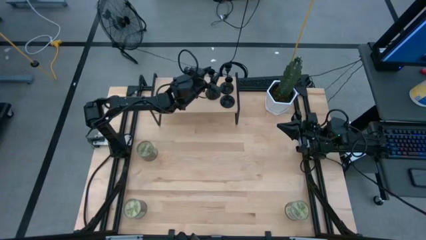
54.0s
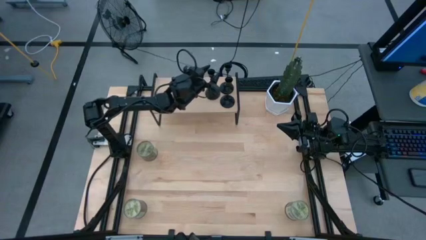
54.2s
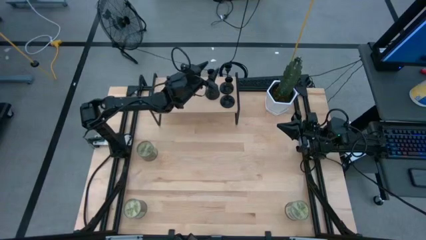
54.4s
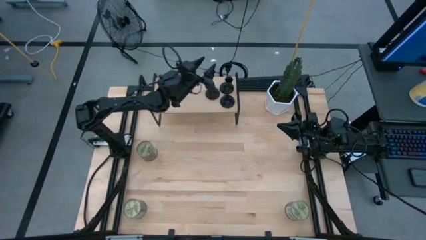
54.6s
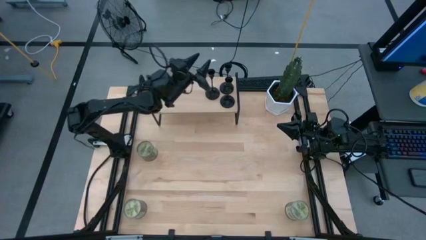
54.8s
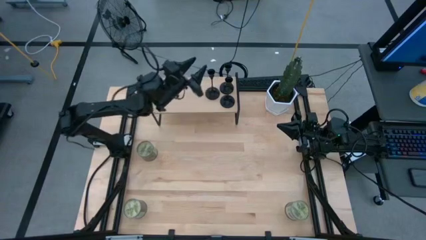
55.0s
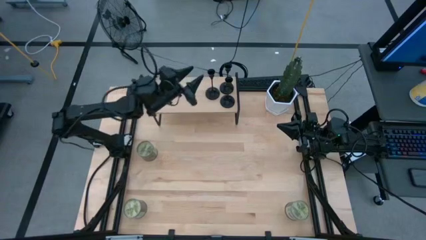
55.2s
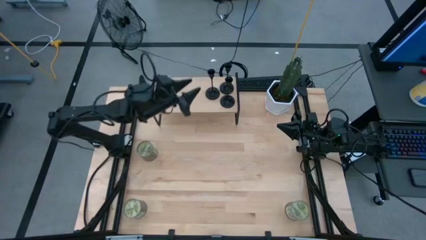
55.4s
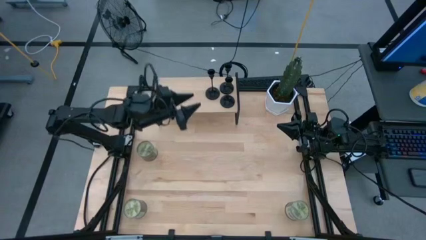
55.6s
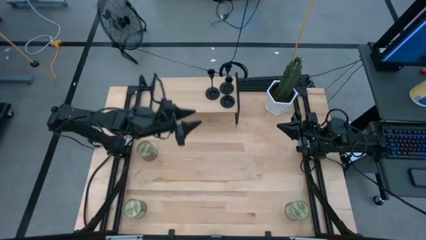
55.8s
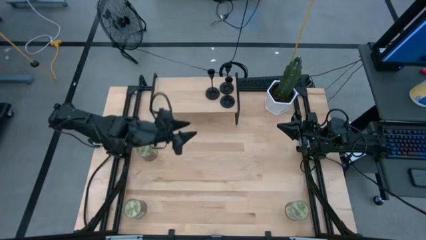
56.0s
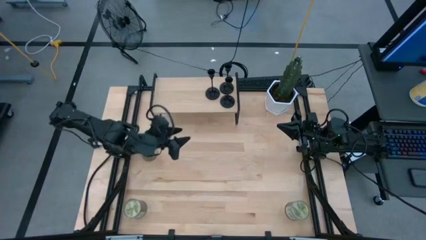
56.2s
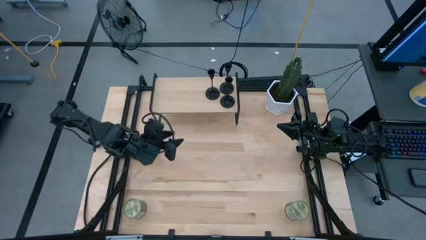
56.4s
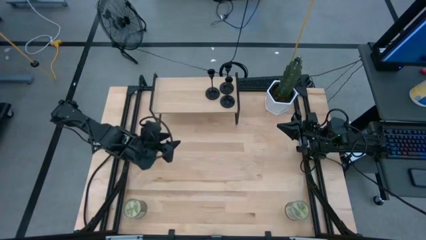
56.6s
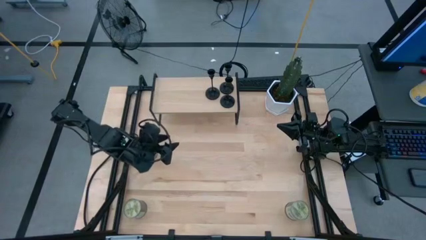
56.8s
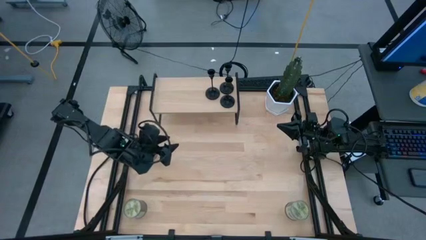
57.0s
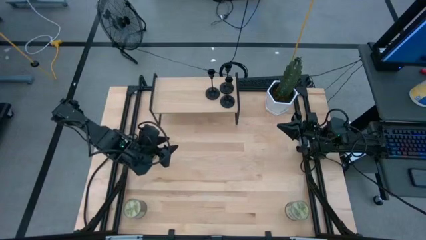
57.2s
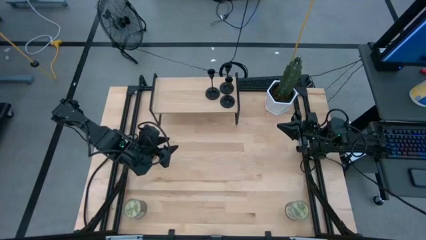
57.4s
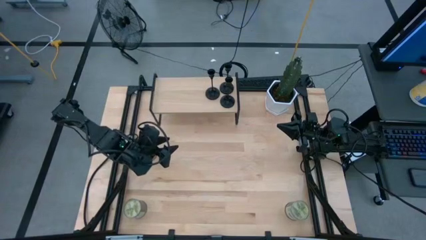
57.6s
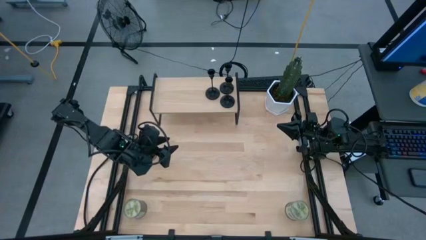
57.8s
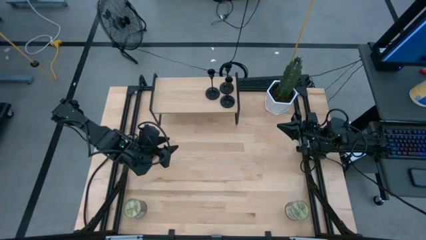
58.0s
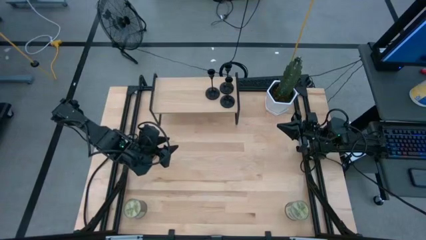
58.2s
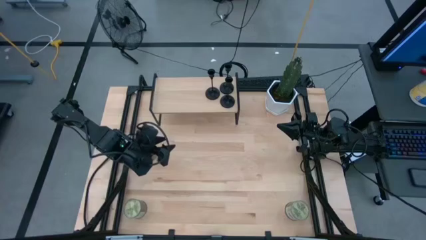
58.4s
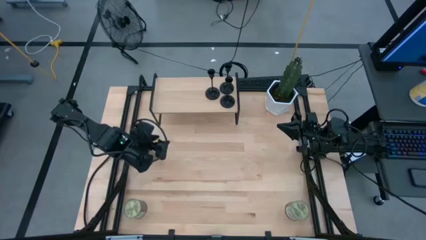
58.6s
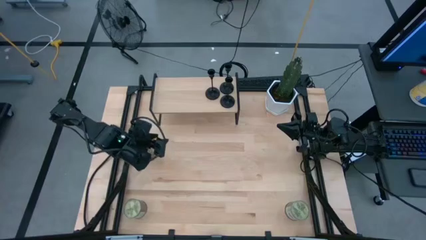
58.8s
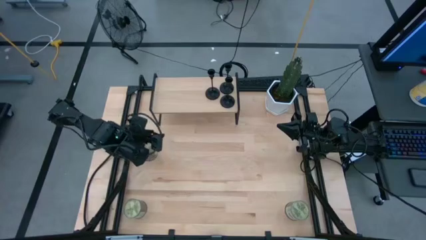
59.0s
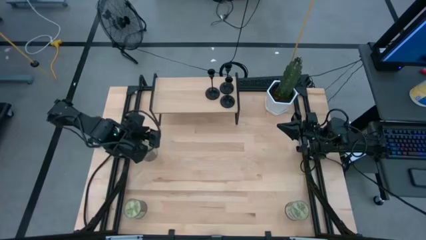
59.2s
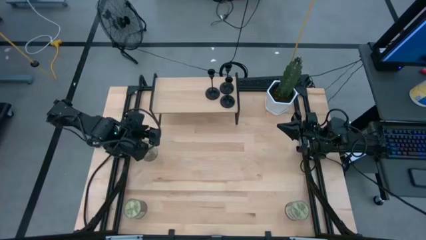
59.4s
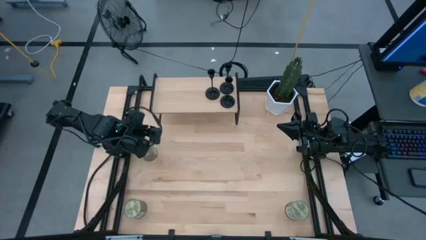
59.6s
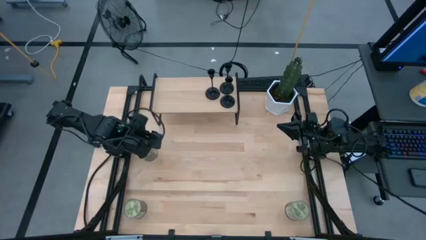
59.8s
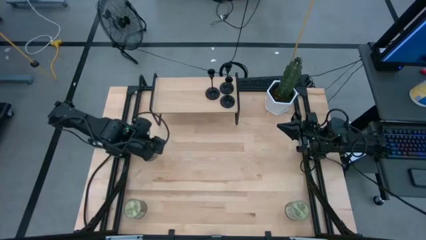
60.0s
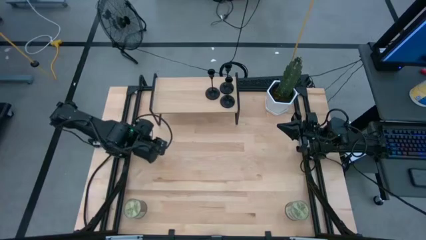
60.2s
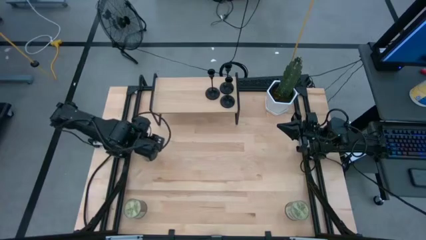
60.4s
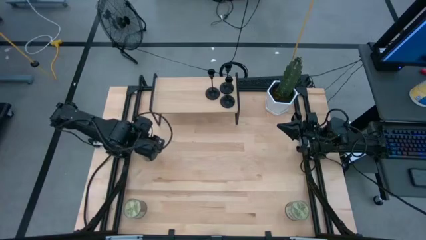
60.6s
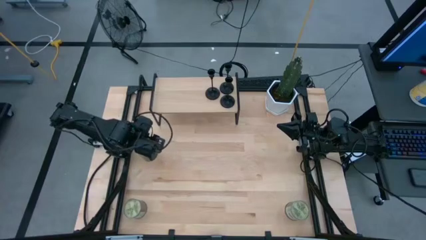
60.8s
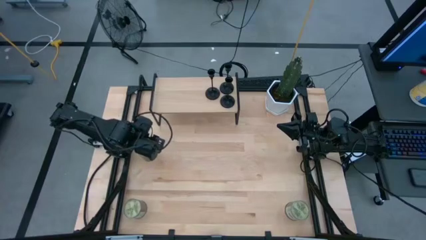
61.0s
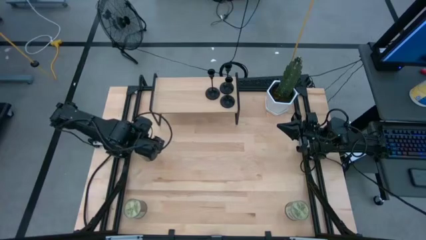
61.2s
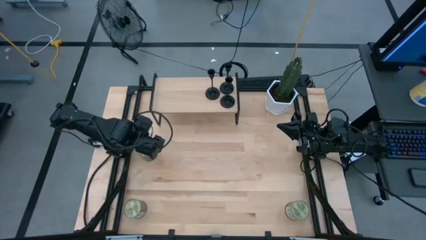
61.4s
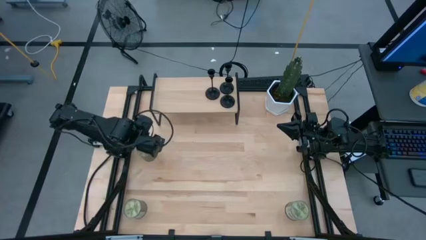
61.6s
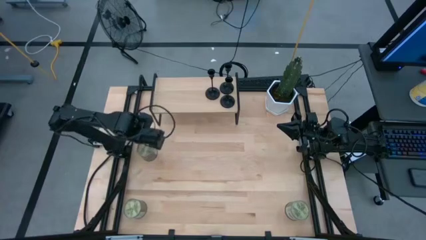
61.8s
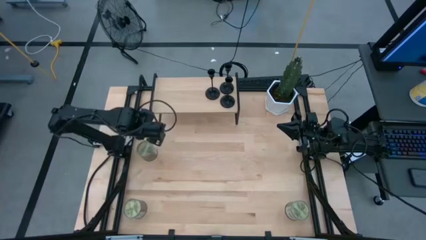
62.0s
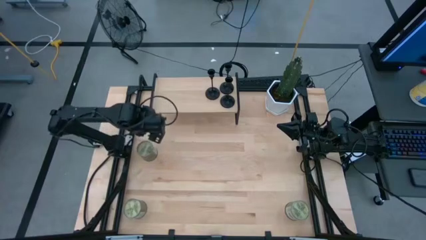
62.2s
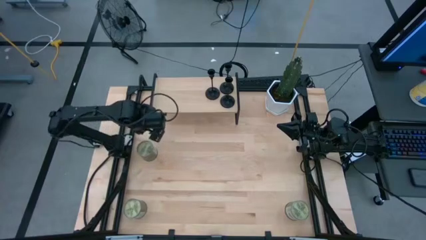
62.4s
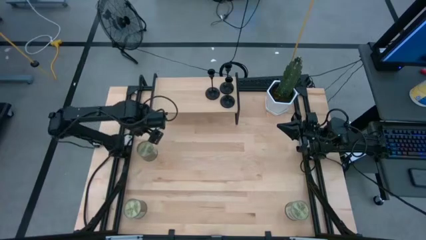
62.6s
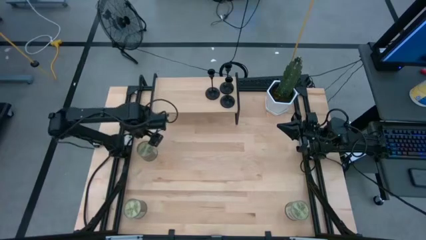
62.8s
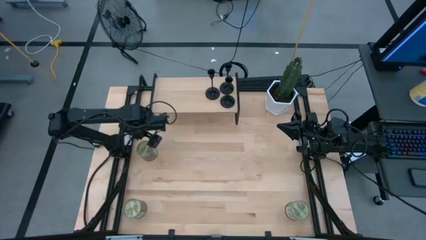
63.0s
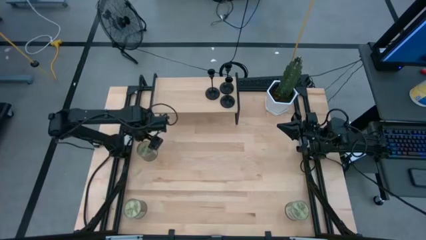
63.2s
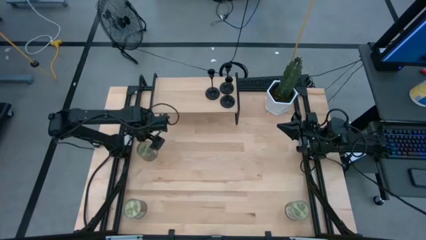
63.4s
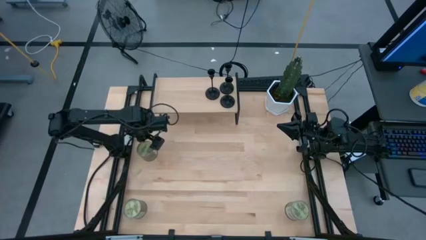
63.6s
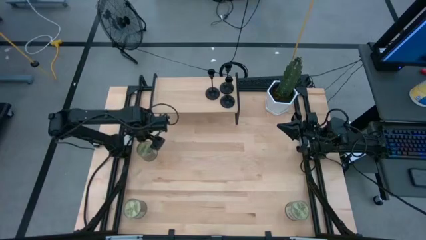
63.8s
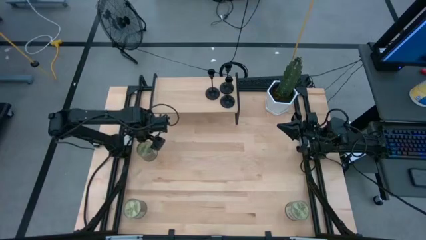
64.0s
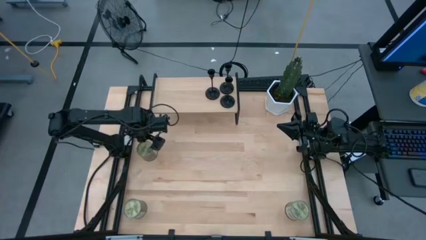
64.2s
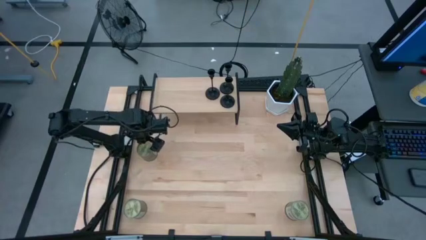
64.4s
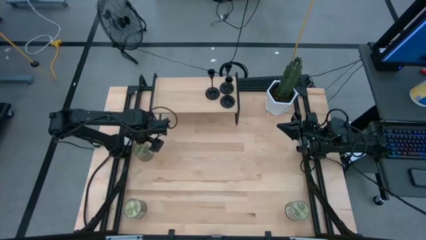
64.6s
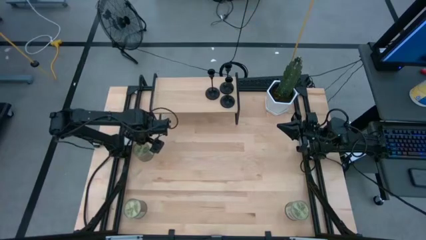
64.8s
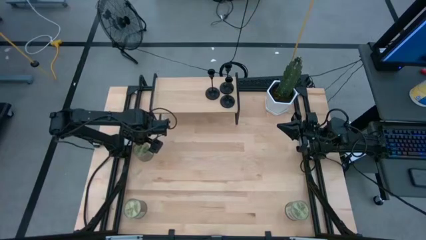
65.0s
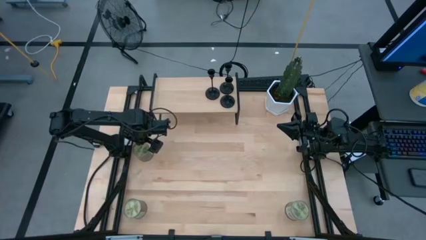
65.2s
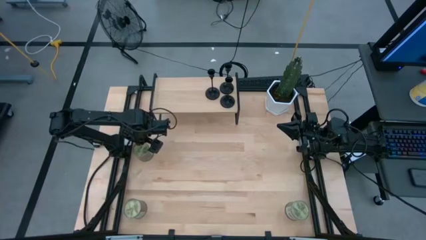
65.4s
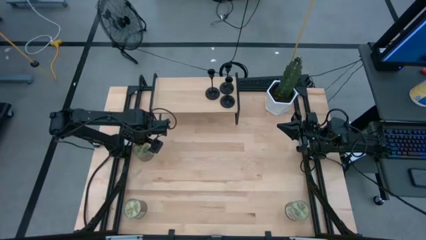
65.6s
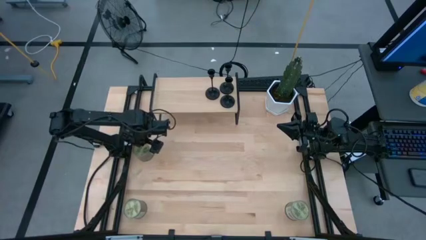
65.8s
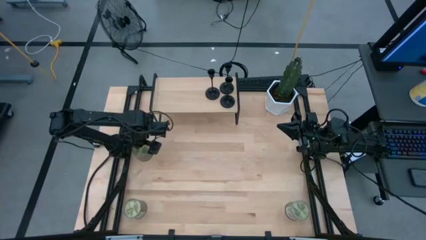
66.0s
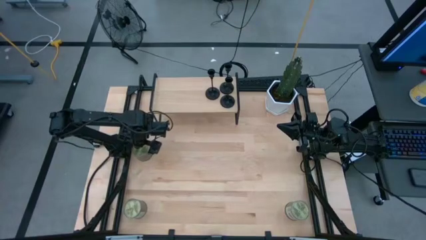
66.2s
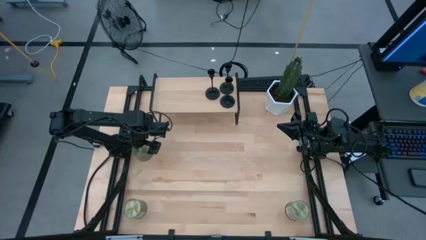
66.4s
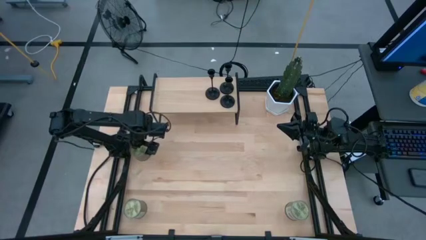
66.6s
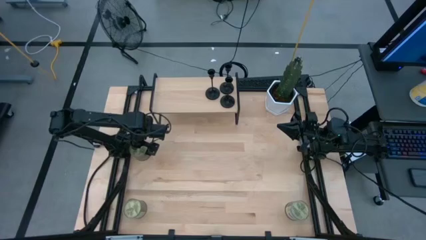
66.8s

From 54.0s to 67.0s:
Task: Pick & Place candle stick holders
Put the top silver scented candle can on the shelf

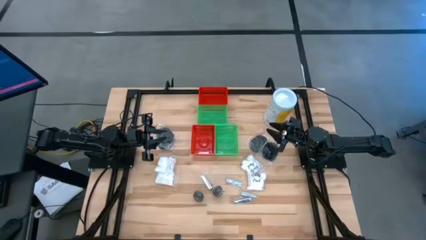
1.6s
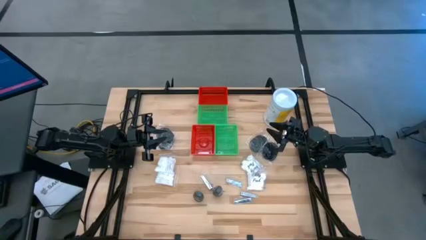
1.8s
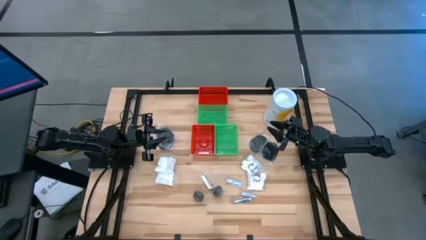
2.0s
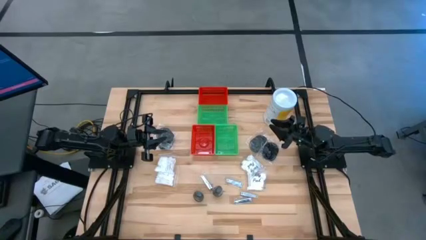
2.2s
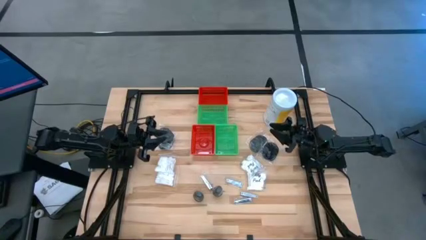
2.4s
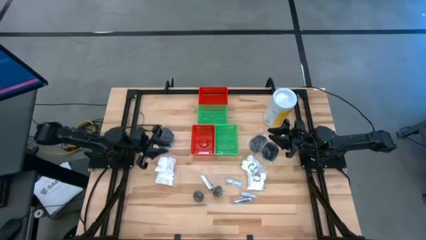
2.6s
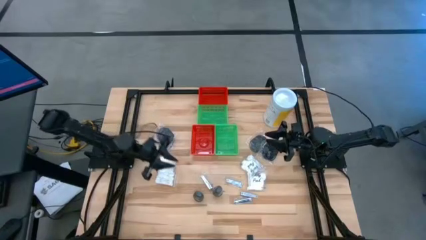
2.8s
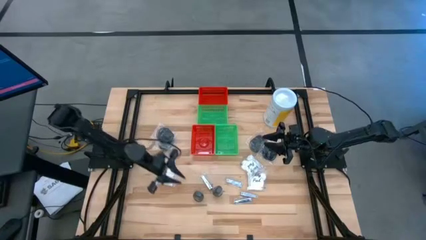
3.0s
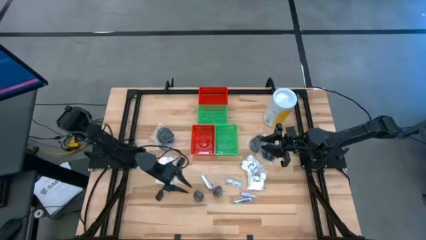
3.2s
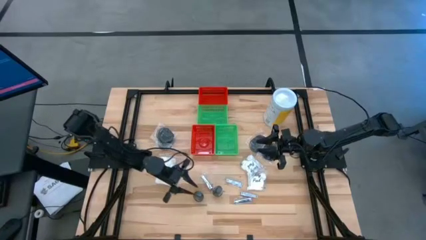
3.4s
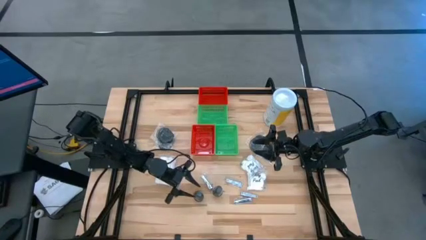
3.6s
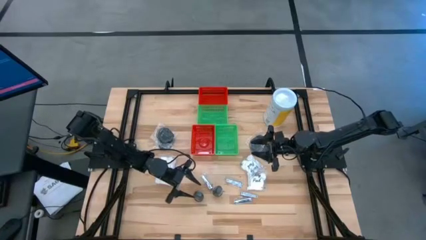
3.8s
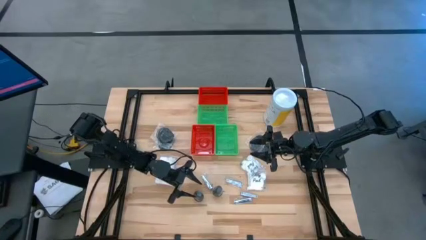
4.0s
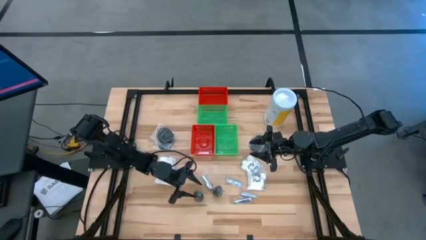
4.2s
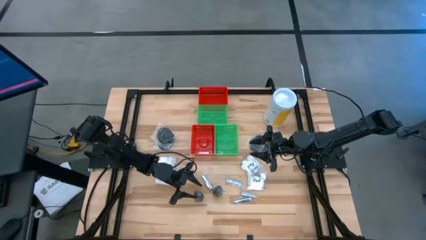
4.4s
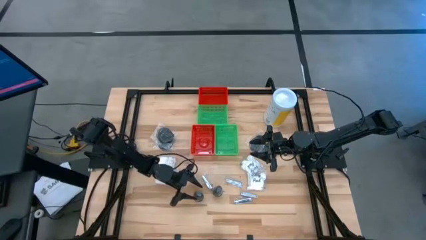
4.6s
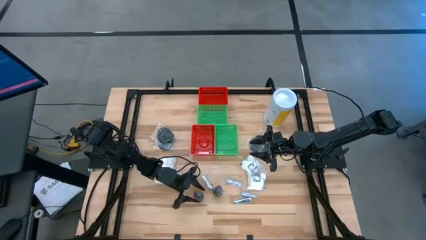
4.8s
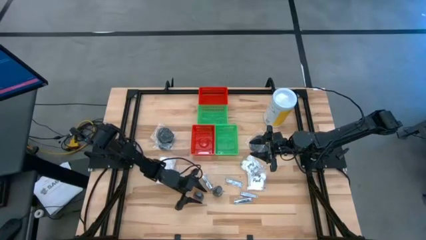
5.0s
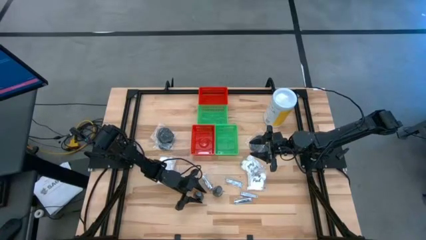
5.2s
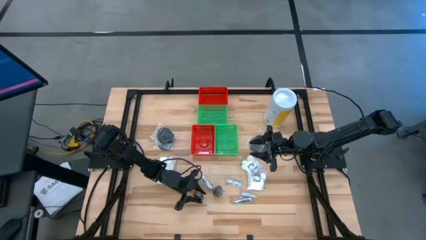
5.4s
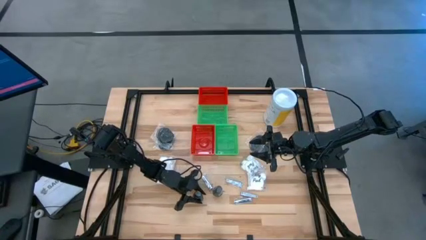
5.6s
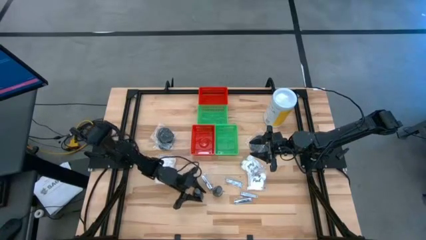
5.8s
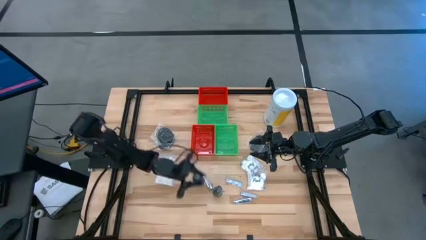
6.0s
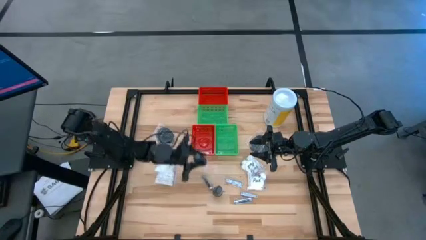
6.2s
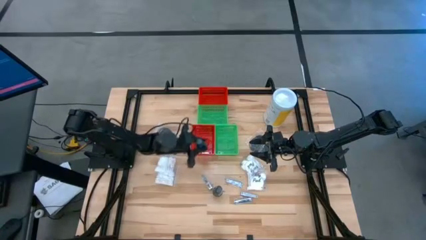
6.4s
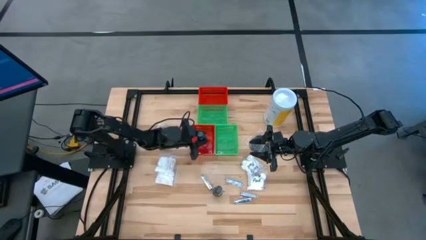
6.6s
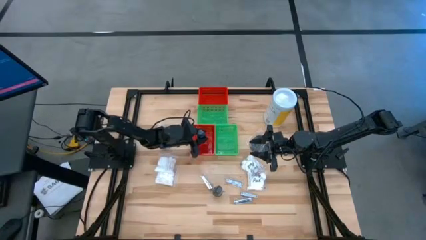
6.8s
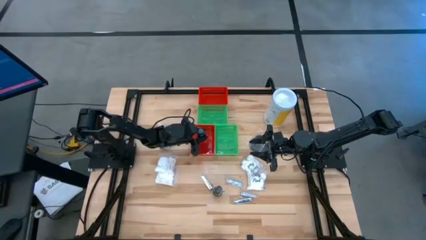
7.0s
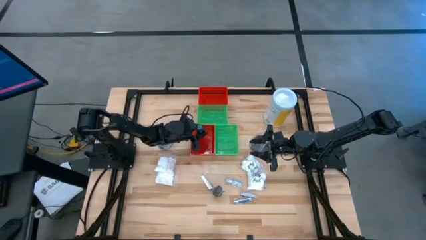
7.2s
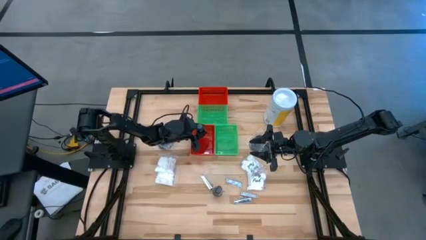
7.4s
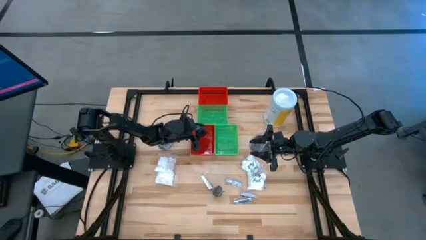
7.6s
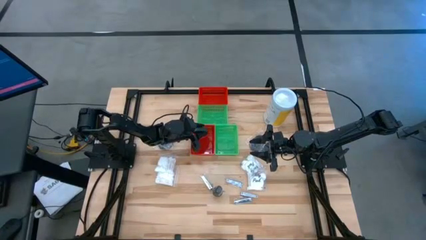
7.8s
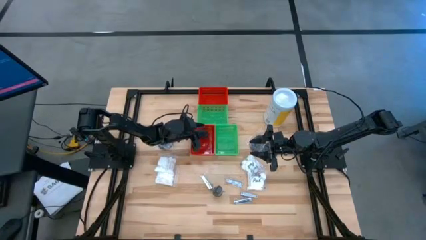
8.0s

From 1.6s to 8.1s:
Task: Pick & Place Travel size toiletries
Put the gray deodorant into the bottom red bin
